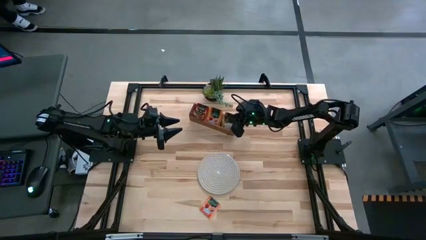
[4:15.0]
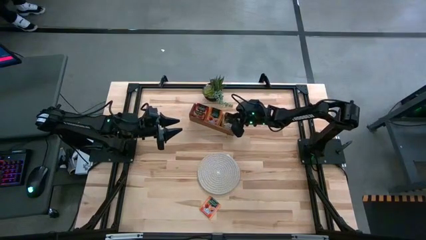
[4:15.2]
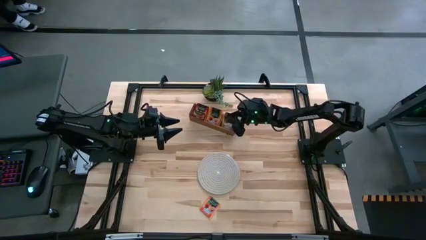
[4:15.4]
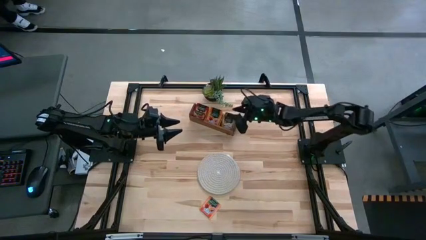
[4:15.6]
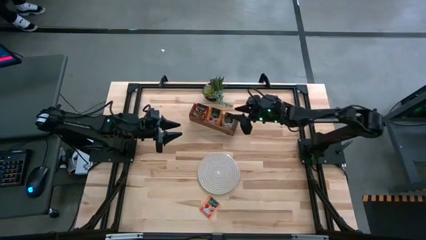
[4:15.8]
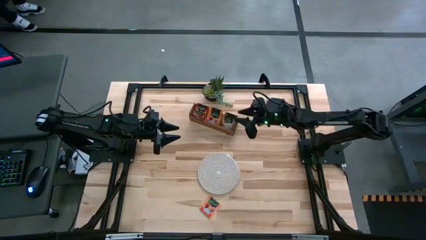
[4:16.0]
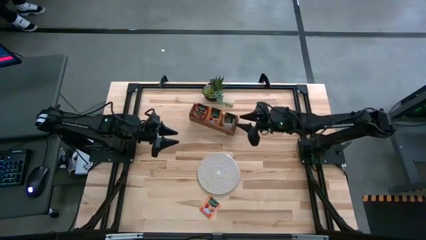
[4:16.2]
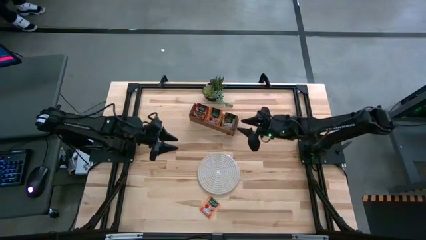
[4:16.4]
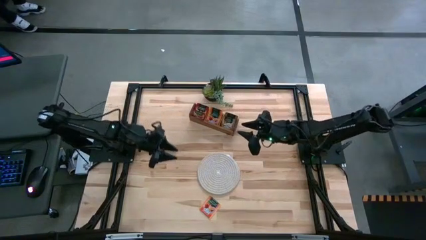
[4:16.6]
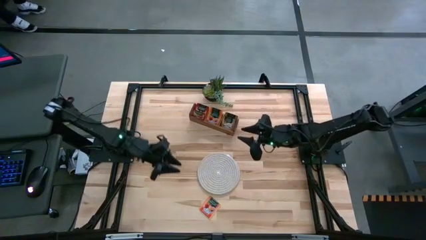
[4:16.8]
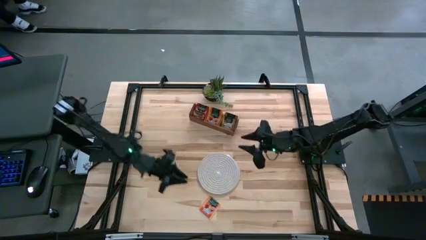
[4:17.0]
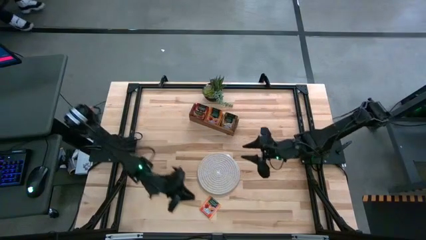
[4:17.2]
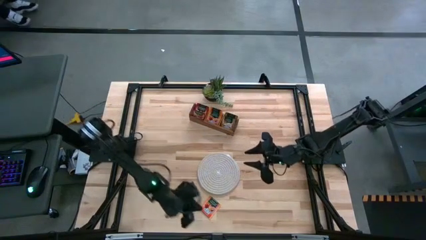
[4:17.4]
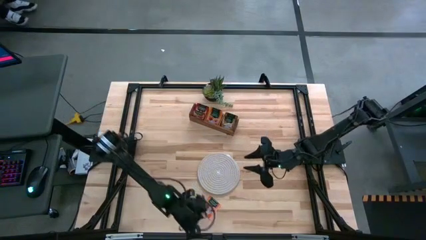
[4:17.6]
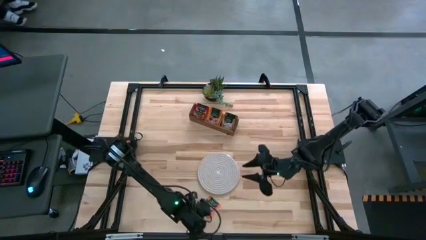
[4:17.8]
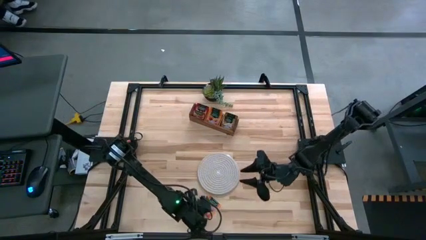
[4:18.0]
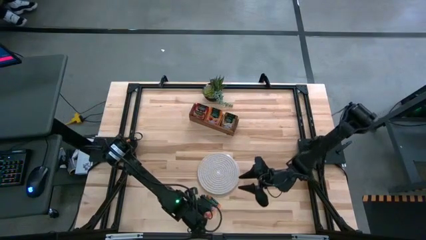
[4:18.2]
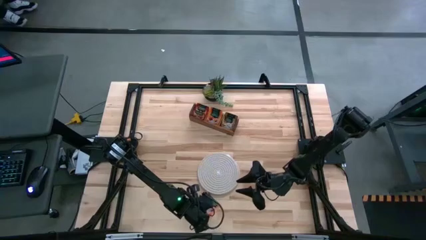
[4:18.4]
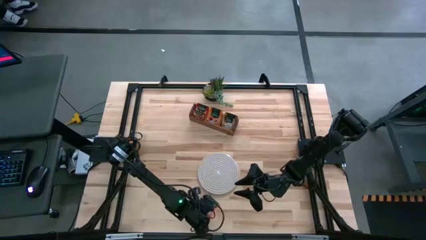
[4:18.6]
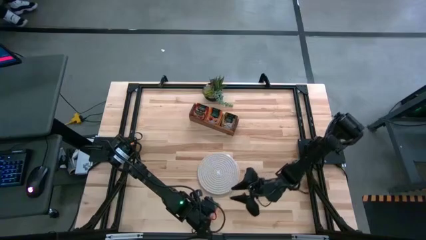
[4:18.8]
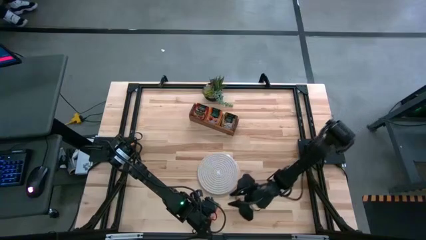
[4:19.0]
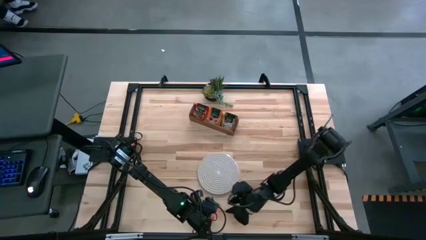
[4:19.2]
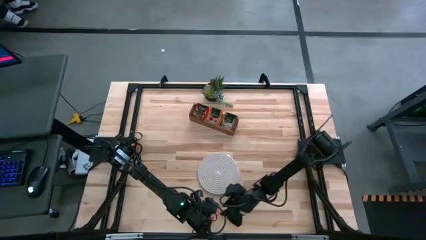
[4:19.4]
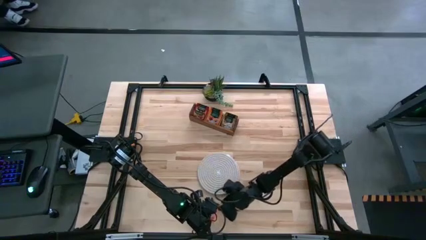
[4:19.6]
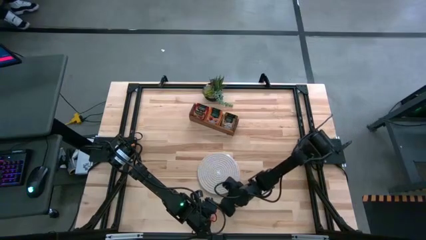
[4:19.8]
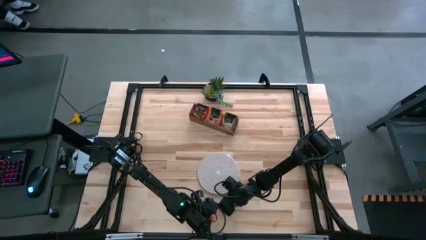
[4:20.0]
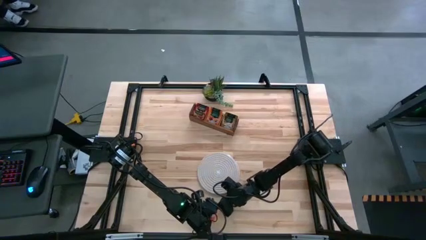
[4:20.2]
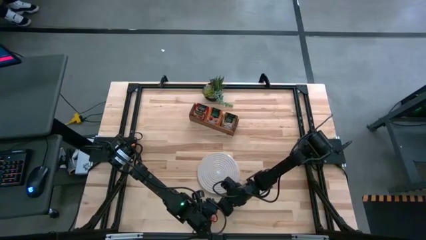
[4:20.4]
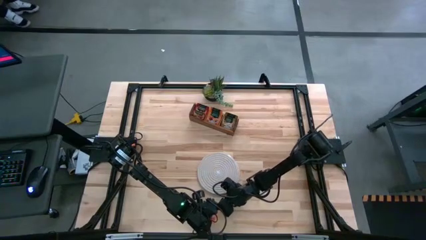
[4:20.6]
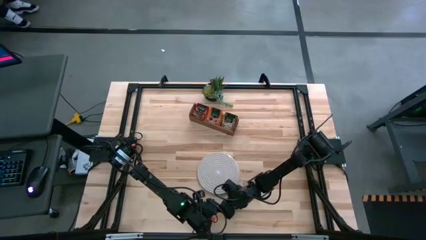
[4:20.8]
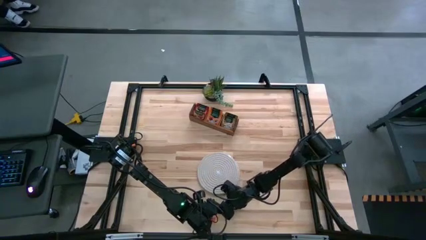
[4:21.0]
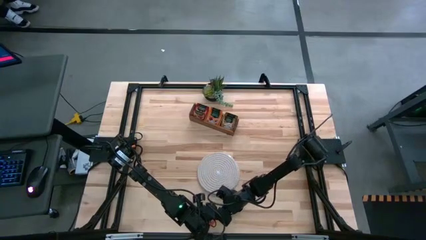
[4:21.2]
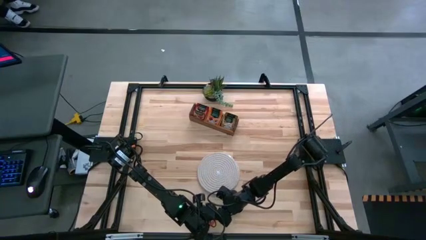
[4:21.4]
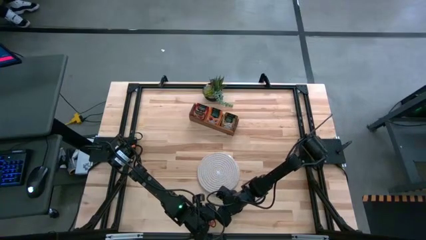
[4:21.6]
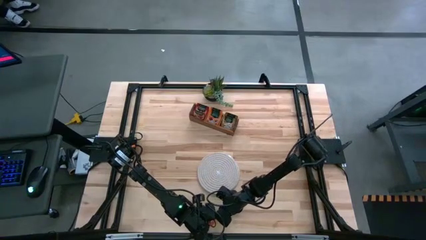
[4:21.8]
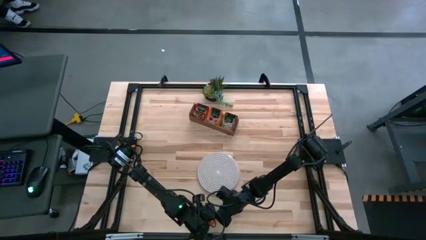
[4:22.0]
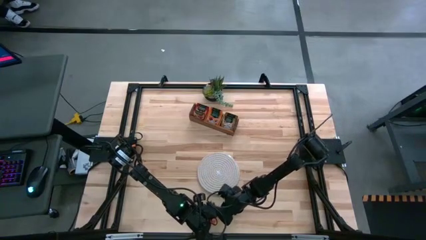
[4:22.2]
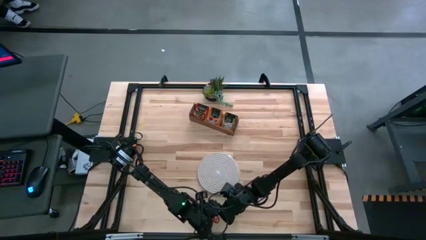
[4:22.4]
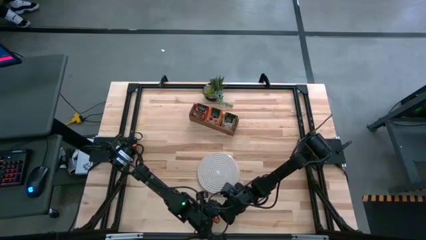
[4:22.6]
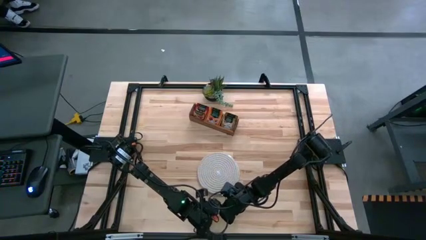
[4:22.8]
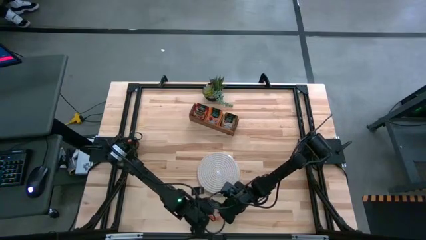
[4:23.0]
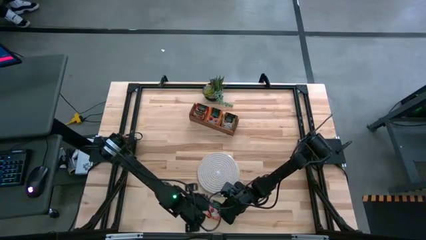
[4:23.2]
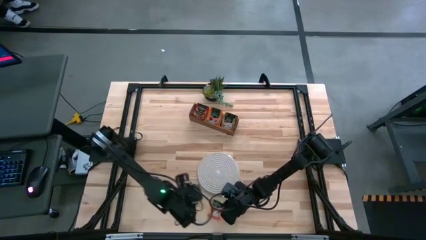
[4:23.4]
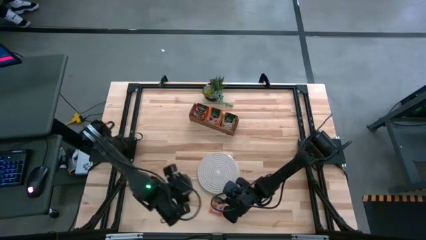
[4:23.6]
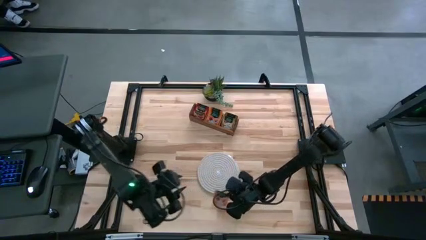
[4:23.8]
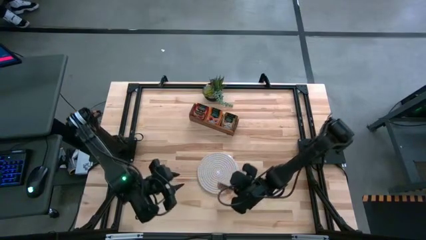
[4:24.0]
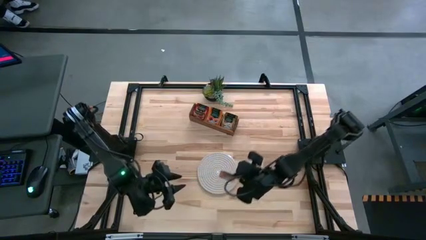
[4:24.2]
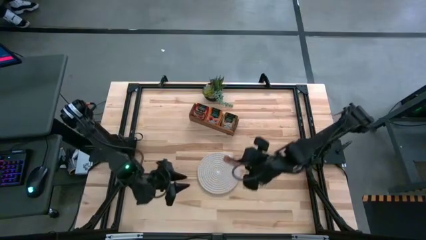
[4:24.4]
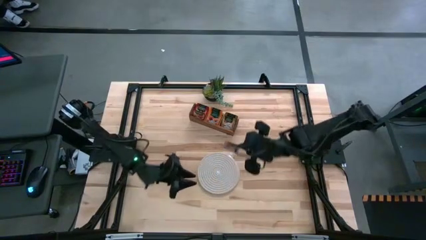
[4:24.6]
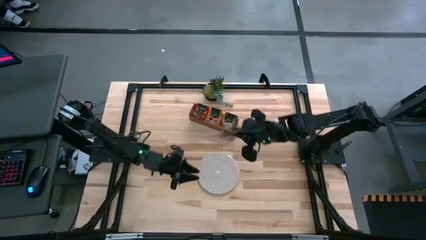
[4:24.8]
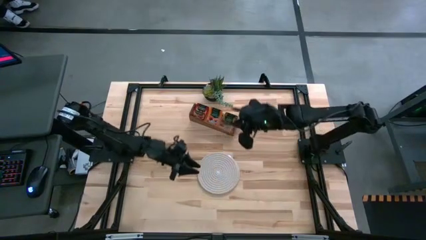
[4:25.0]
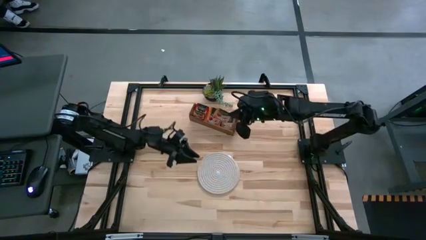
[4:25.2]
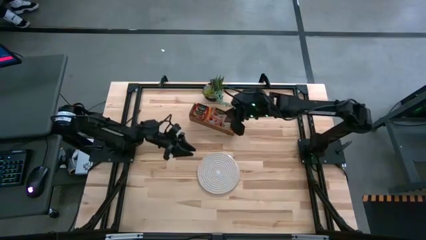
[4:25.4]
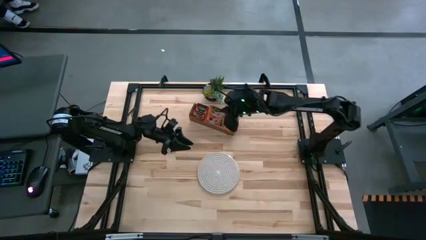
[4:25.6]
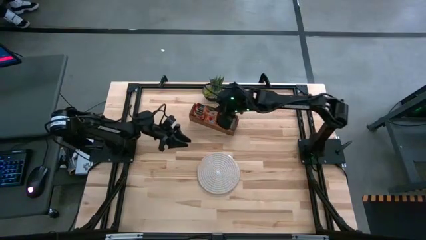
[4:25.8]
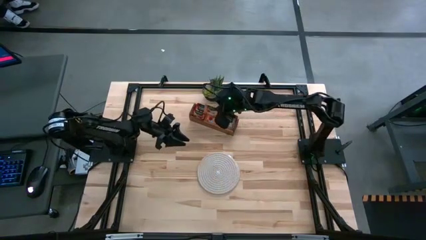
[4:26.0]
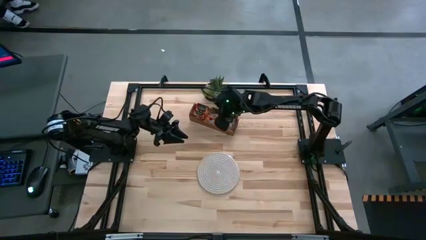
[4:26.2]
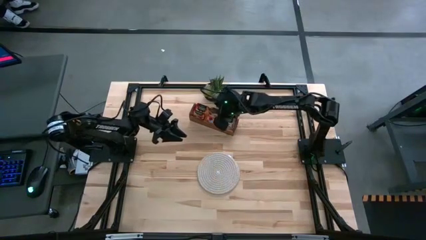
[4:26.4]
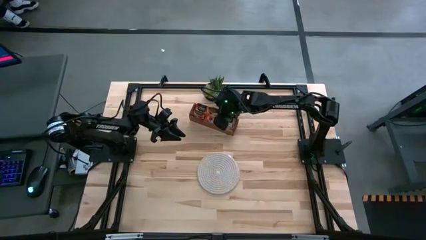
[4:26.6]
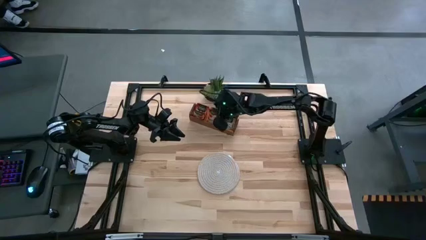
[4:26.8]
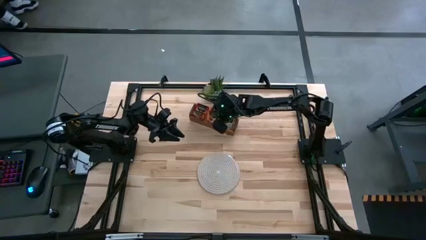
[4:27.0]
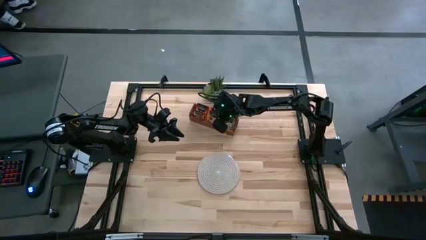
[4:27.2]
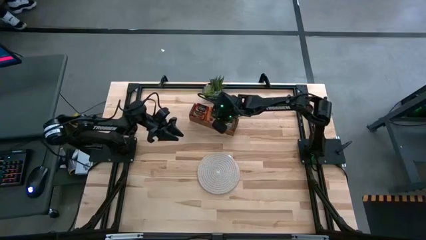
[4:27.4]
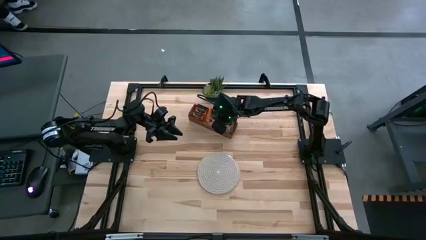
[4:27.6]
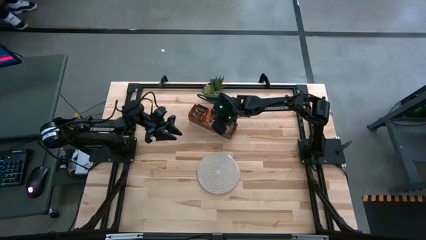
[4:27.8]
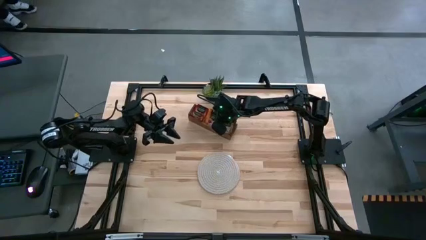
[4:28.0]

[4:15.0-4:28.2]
Task: Pick & Place Tea
Put the orange tea bag into the middle section of the wooden organizer

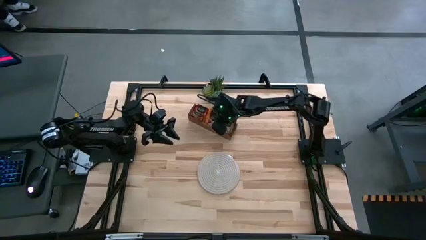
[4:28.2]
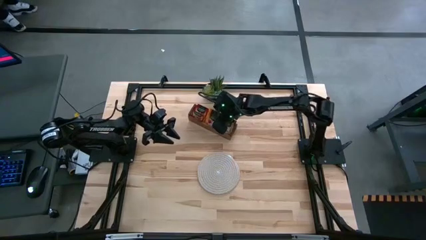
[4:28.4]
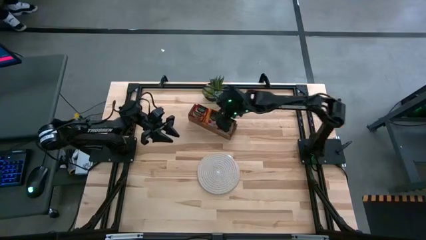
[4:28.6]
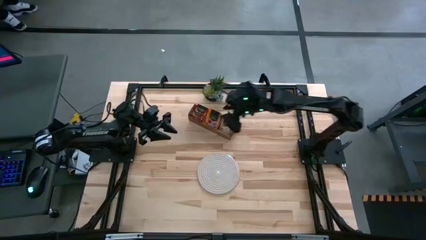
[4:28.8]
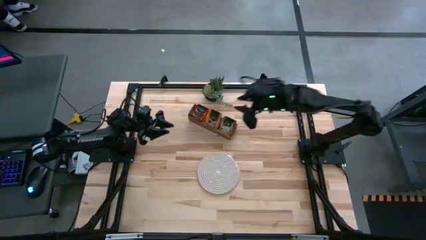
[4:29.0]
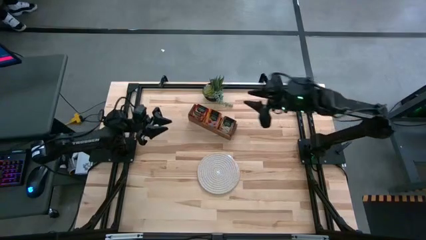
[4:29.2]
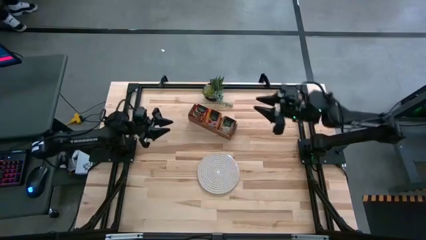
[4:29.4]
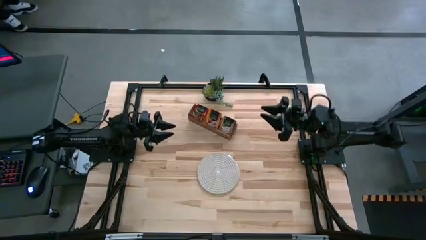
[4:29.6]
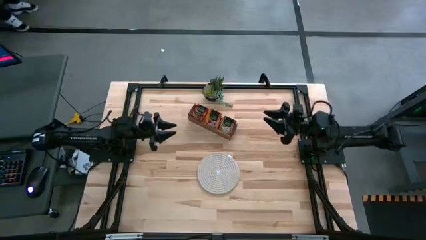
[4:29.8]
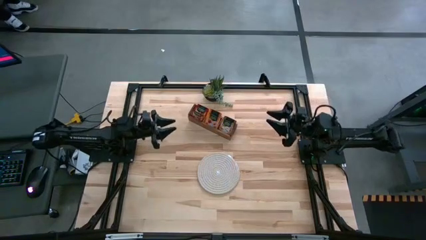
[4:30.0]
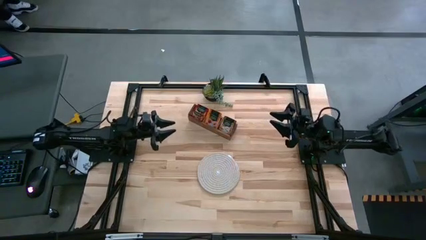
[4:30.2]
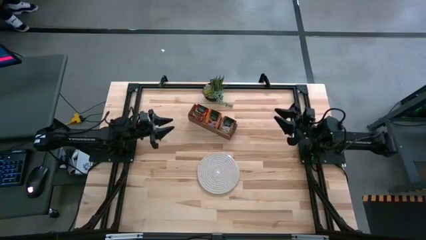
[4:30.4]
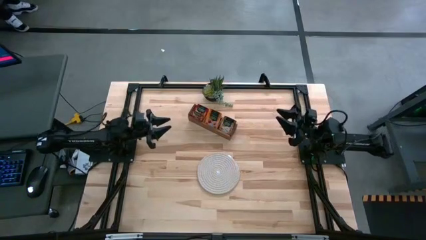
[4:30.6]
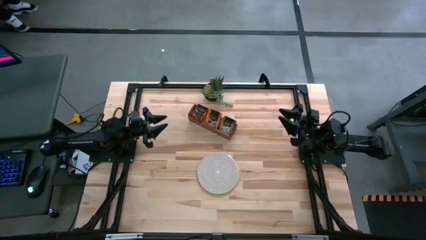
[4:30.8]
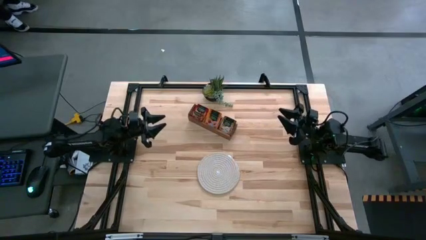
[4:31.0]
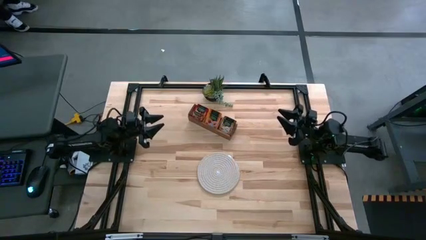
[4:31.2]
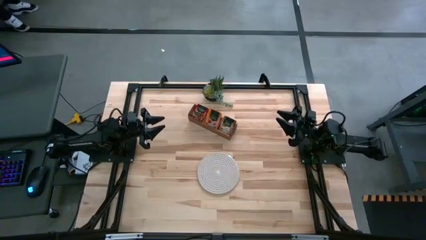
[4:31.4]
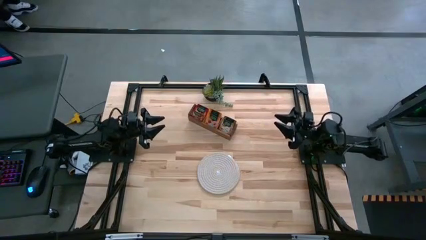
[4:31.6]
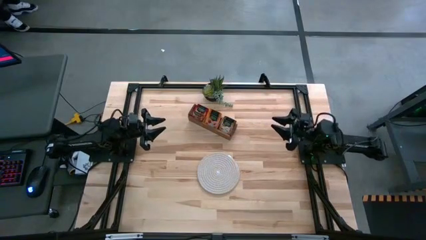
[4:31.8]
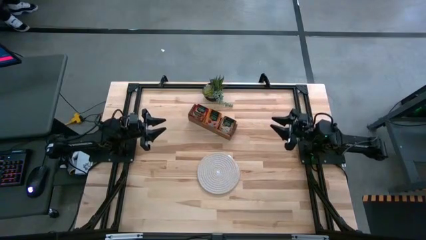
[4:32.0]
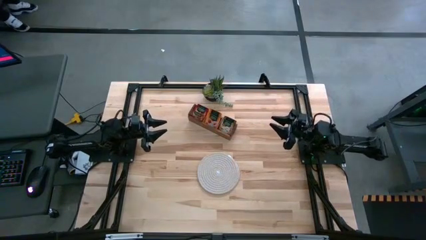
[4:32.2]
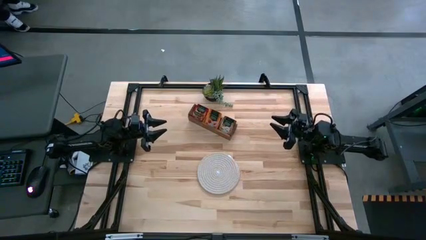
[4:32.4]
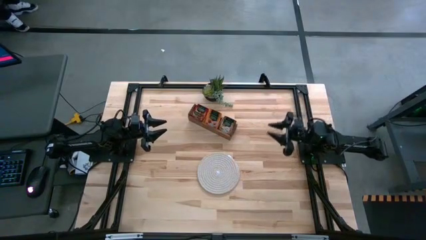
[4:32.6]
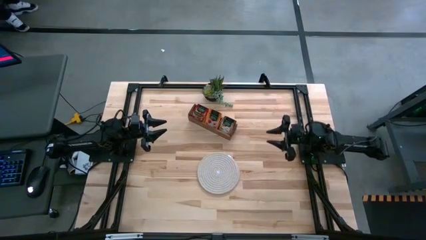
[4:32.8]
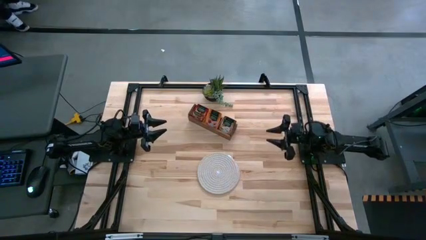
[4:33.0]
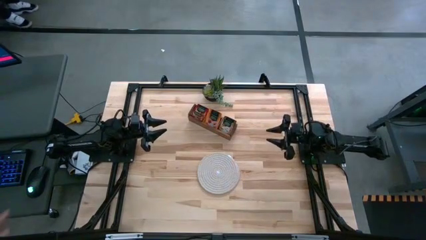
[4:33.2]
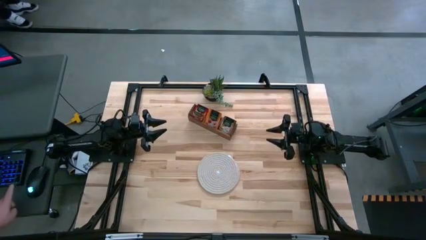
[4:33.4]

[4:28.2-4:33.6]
Return to Home Position
